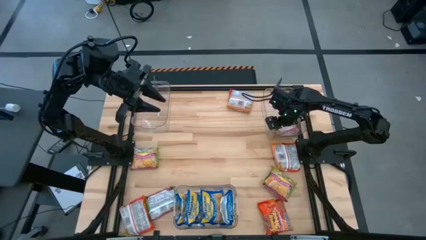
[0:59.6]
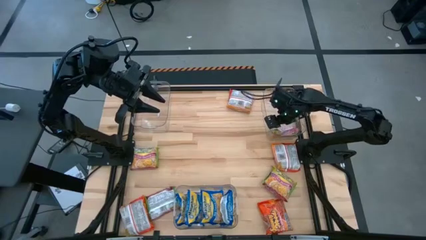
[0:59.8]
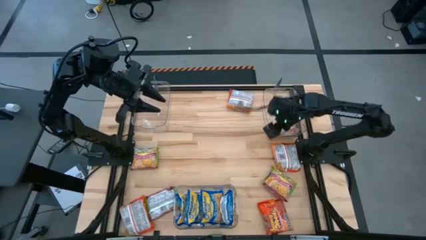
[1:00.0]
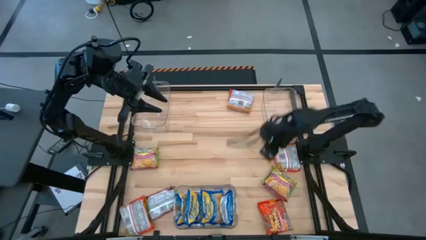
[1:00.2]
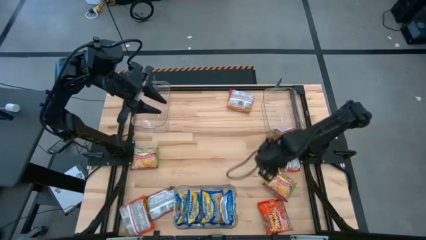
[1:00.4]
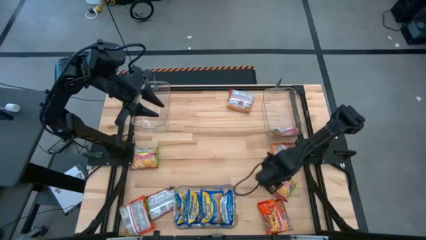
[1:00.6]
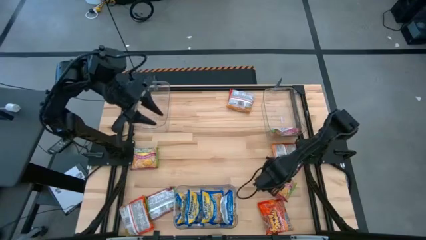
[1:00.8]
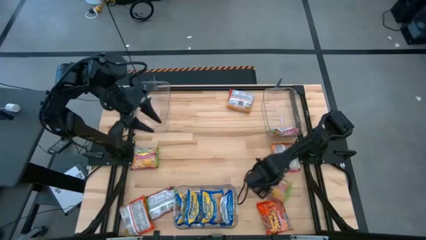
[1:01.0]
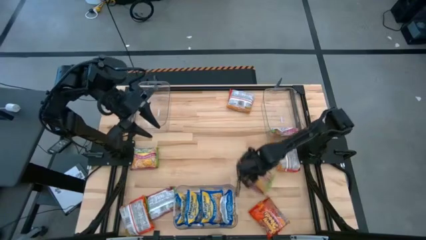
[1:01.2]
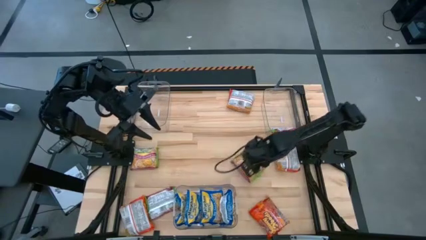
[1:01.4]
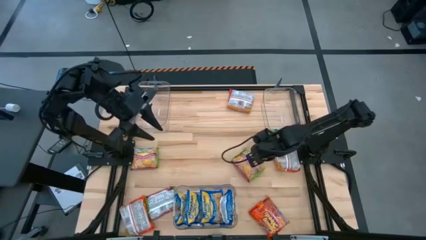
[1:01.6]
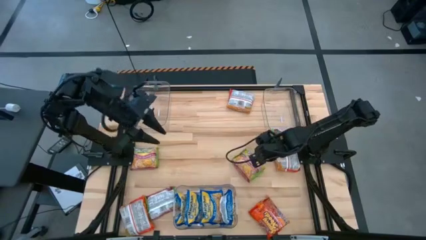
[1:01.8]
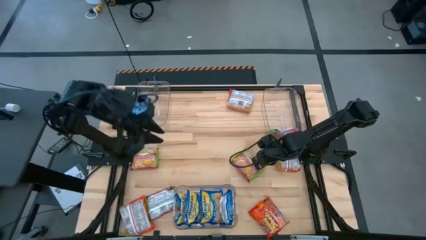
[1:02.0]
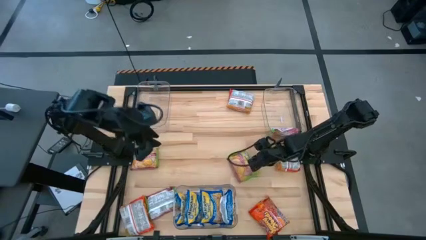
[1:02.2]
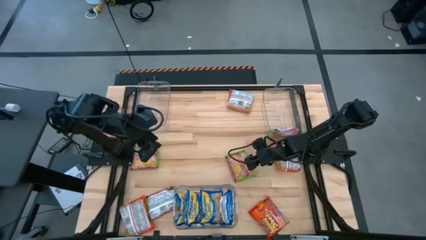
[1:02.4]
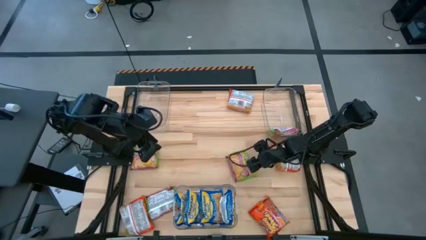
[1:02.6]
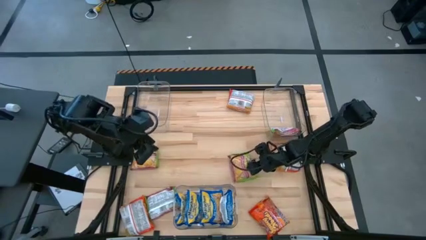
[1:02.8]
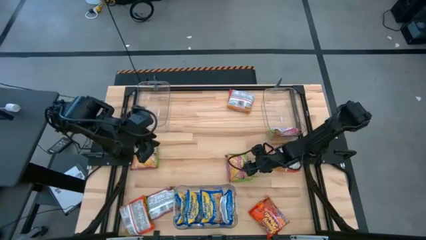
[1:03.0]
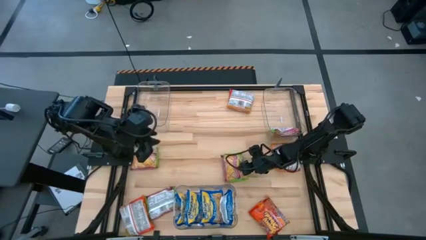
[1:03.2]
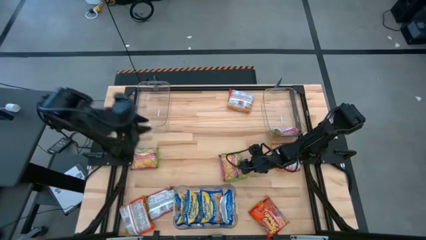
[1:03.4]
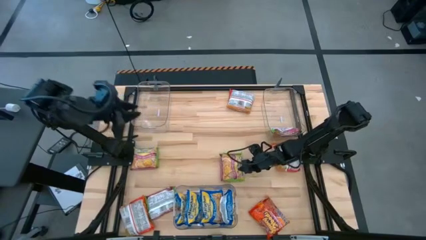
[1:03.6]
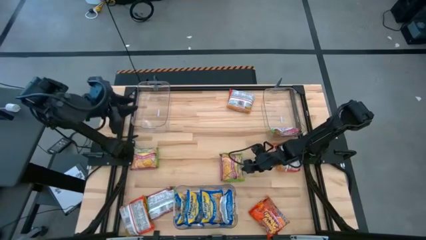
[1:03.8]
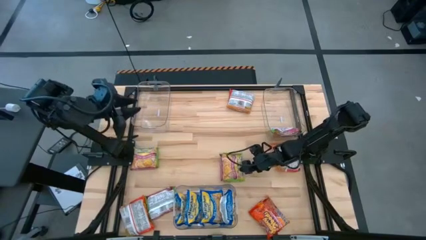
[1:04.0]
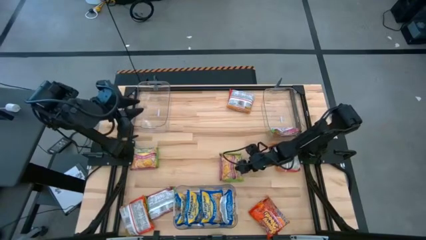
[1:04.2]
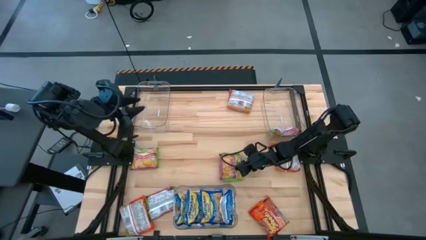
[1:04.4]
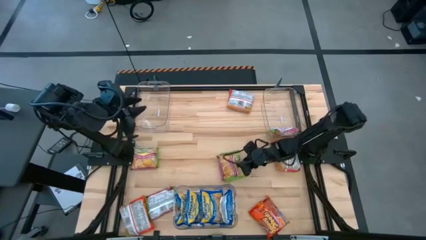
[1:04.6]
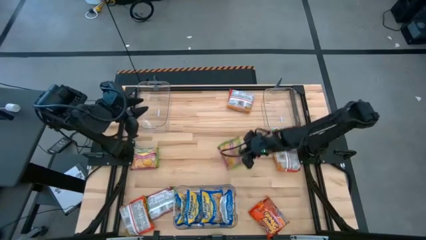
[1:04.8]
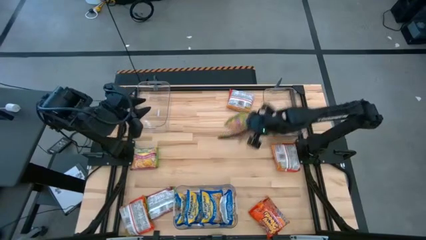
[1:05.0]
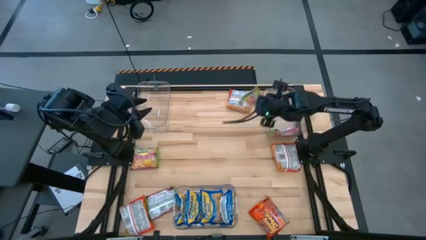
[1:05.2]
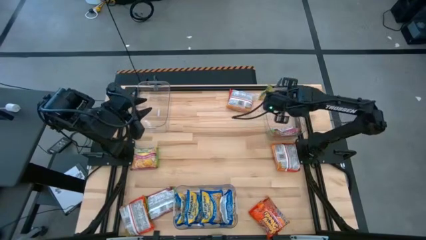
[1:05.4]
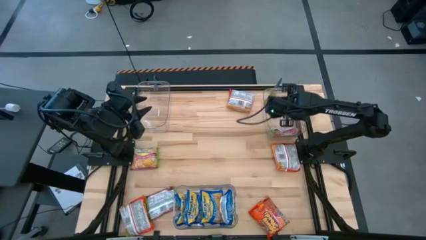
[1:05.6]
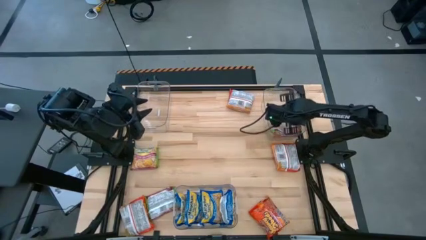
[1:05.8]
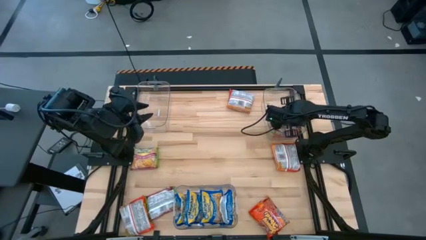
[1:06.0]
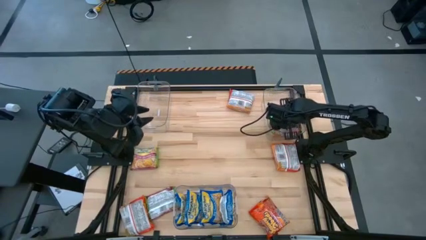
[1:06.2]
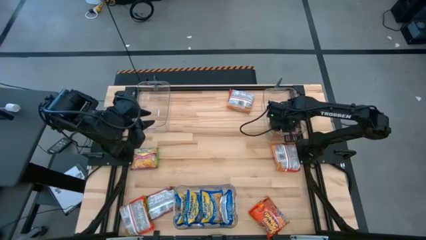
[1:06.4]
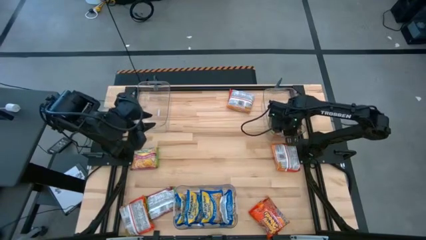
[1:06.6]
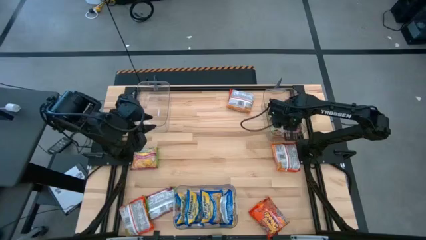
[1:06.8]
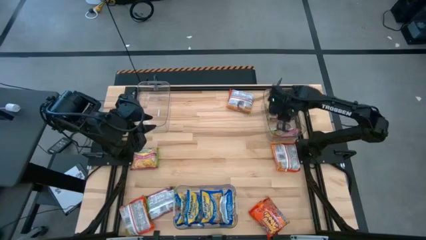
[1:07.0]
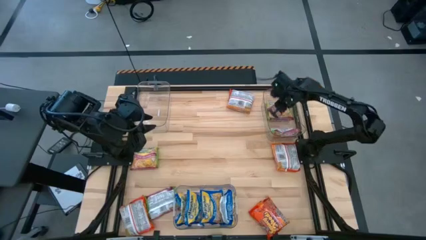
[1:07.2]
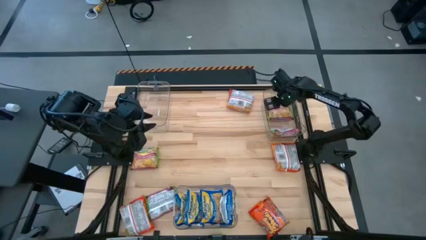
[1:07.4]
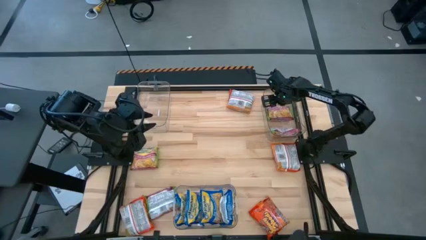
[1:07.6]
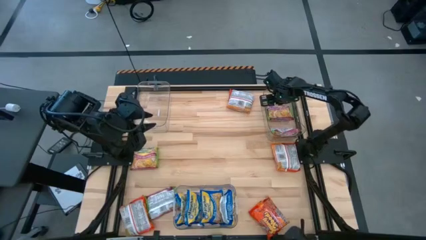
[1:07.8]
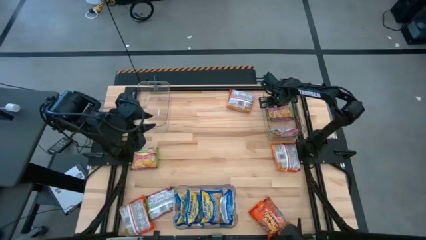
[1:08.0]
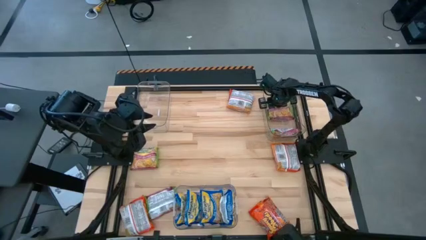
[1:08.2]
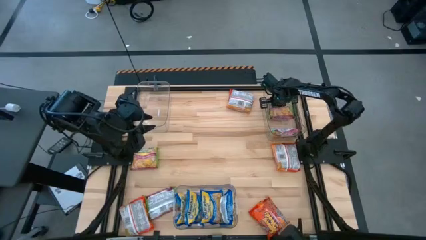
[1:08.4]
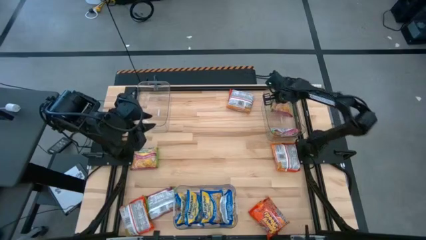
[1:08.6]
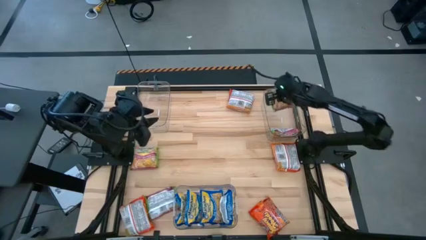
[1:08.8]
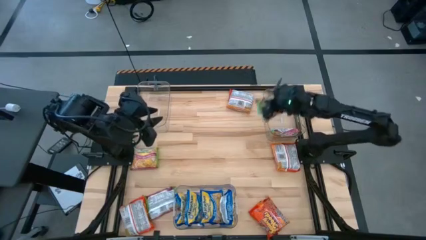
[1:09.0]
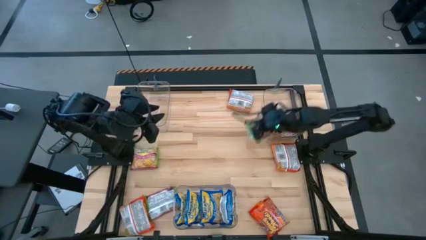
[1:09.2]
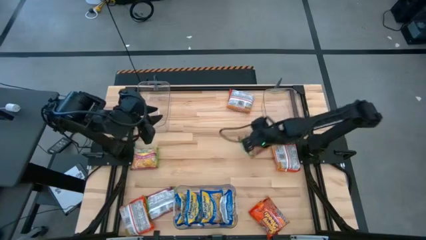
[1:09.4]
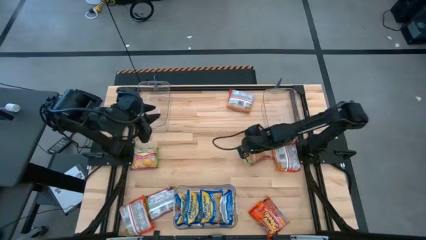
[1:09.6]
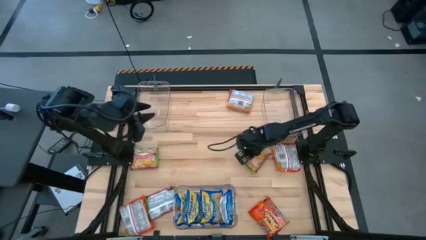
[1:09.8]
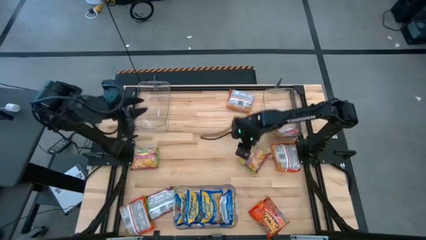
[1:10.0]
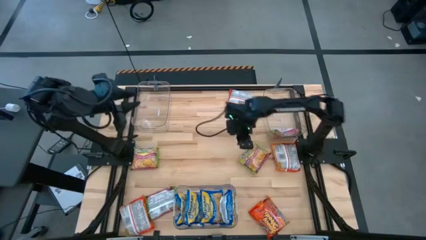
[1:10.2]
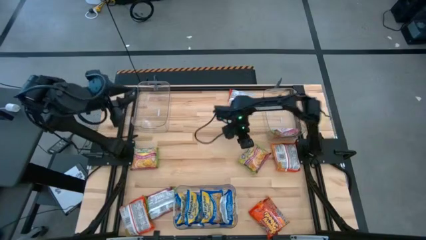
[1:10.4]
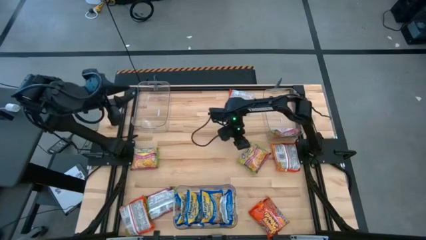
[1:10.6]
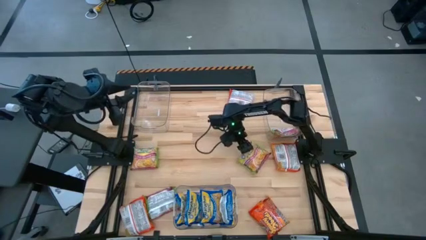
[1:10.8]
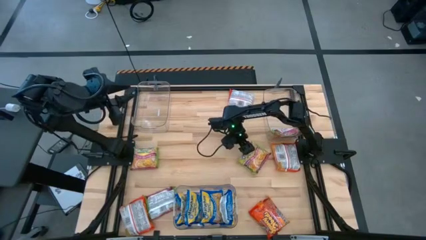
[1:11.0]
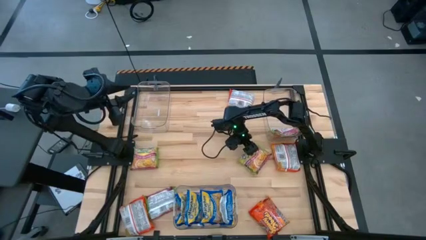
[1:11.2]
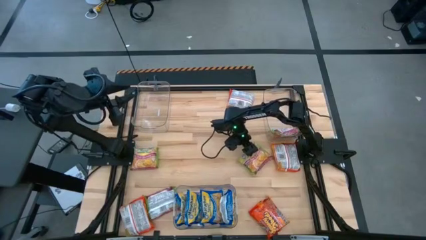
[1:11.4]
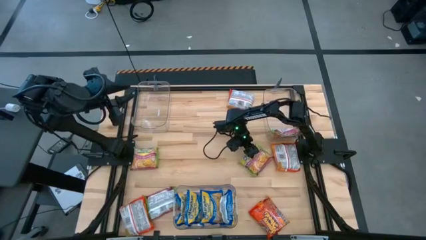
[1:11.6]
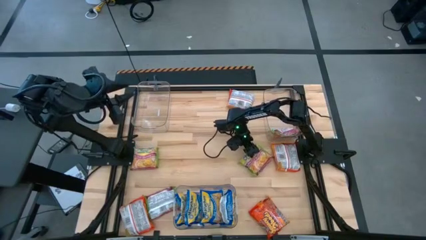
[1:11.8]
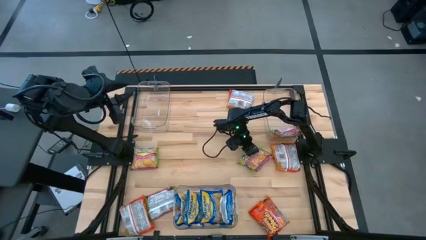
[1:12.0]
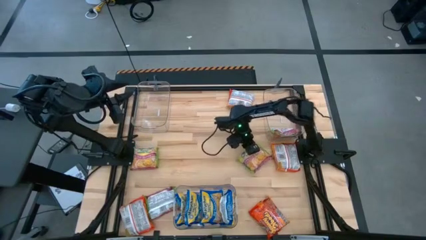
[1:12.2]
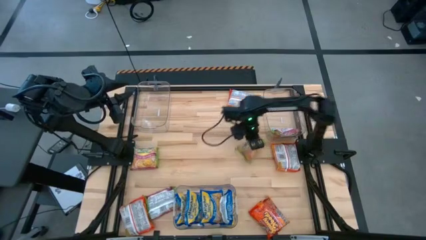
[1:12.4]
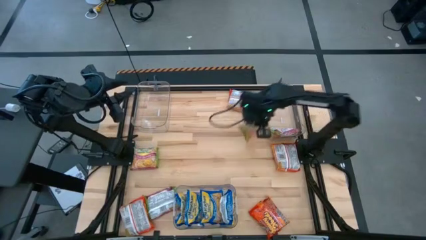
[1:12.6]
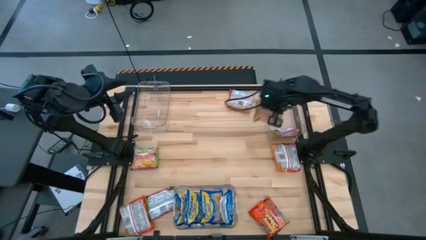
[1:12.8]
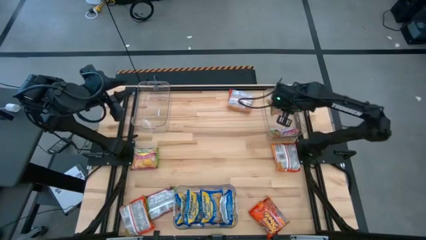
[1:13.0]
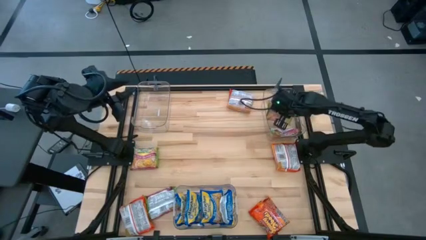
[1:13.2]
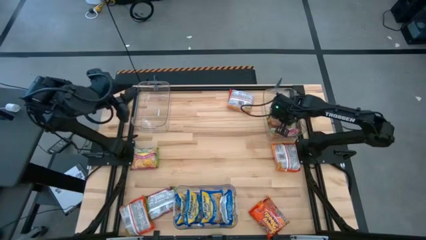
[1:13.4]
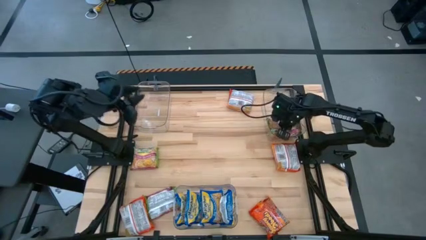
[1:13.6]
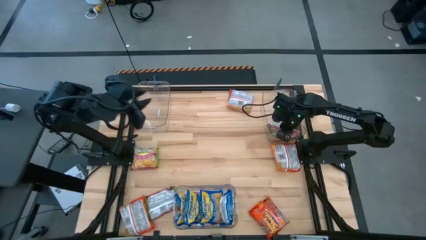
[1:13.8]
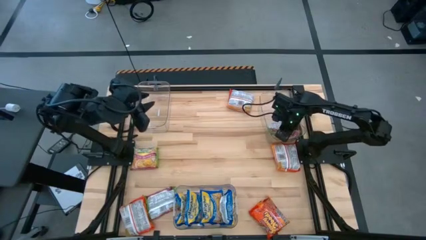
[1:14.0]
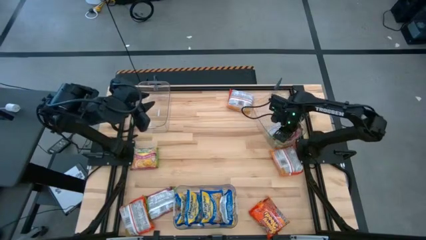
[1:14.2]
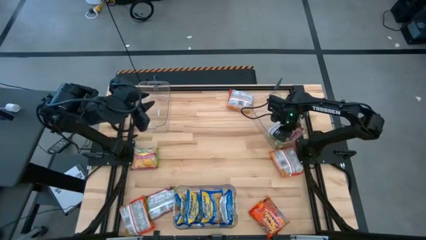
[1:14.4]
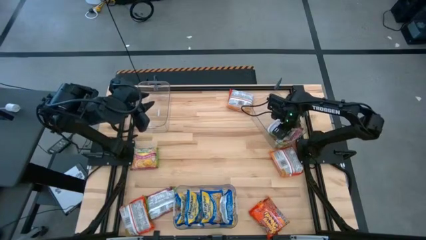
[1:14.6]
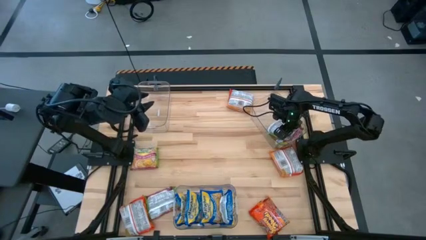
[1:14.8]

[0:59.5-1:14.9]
Task: Sort Maruchan noodles
Put the green noodle pack into the top right transparent bin

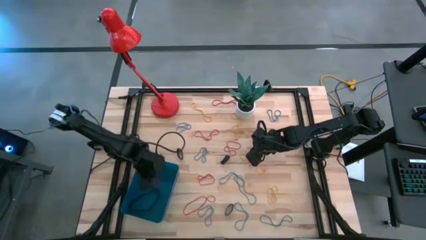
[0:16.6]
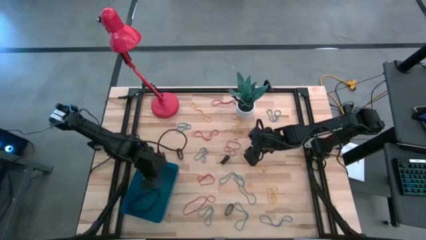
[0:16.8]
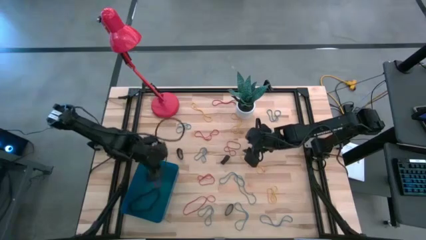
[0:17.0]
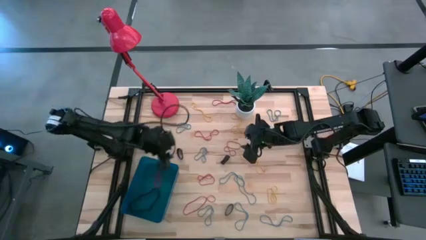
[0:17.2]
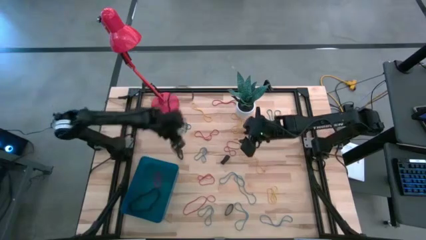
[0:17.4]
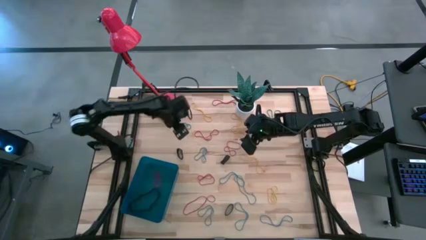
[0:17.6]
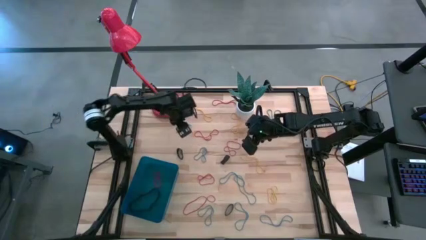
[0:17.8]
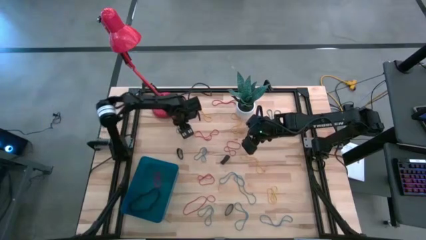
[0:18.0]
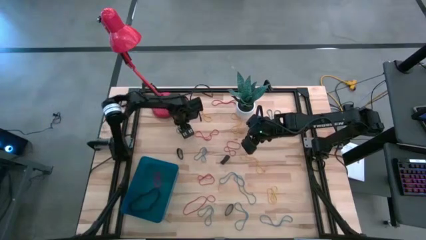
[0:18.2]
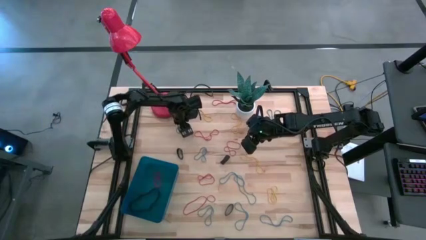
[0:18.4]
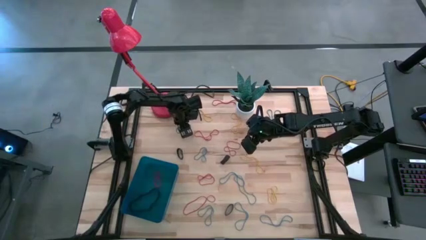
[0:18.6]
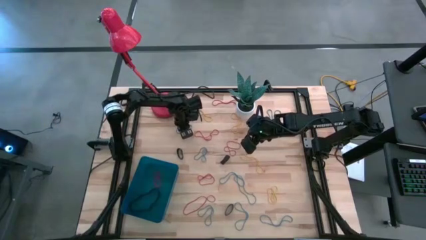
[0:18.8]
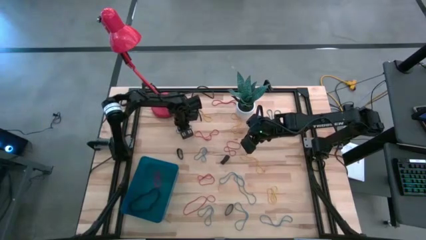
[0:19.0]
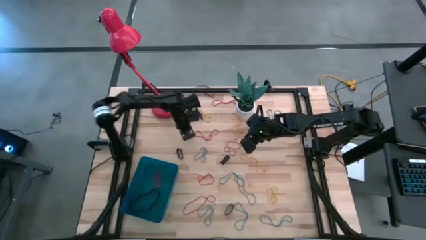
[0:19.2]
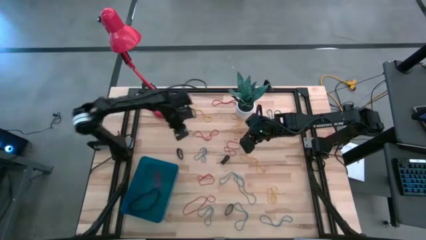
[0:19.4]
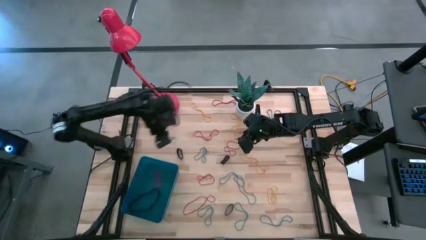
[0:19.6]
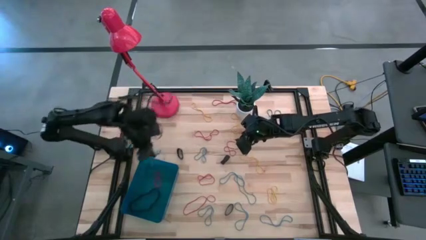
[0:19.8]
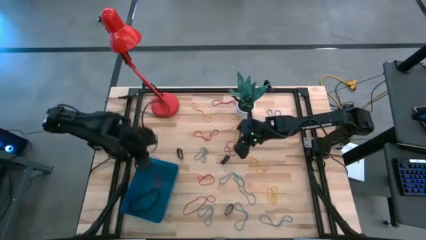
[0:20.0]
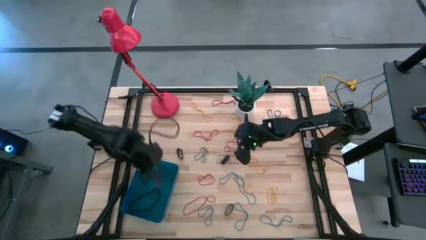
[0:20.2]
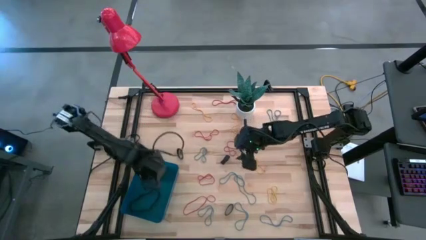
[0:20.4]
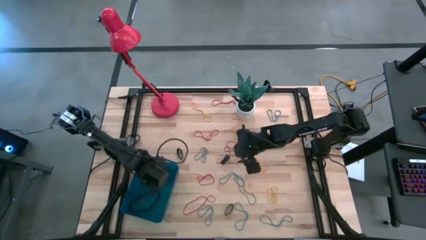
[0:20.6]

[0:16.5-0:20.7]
Task: Pick and place rubber bands into bin
Put the blue rubber band into the blue bin
